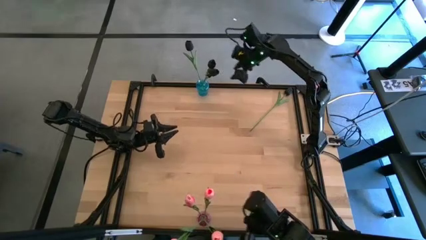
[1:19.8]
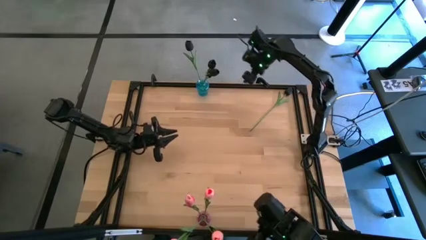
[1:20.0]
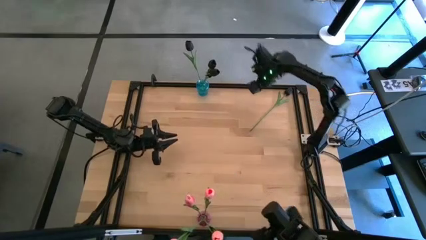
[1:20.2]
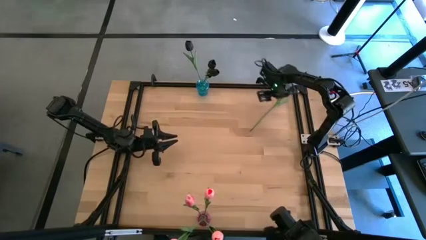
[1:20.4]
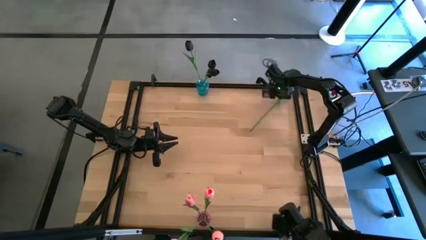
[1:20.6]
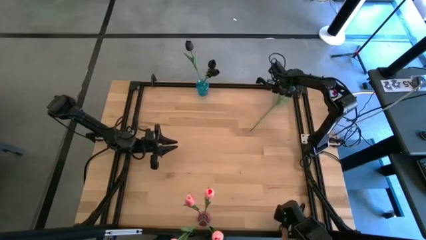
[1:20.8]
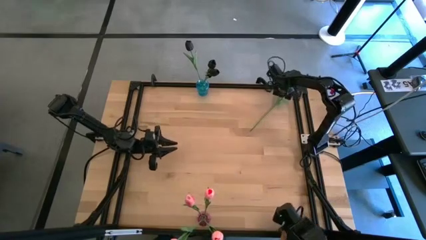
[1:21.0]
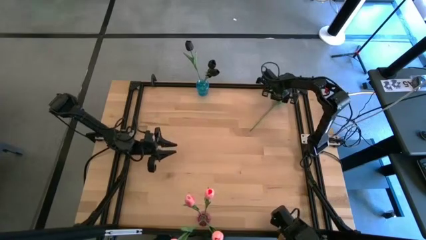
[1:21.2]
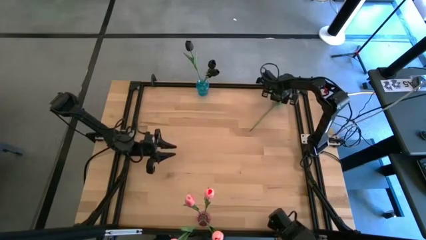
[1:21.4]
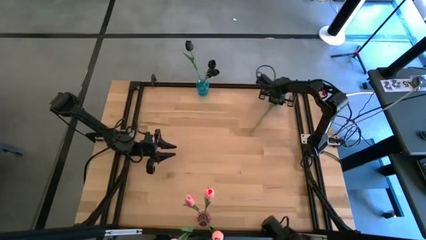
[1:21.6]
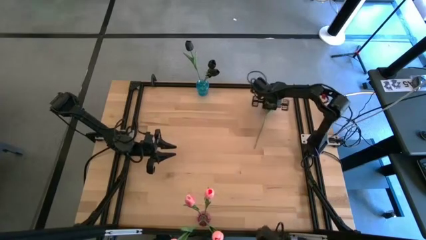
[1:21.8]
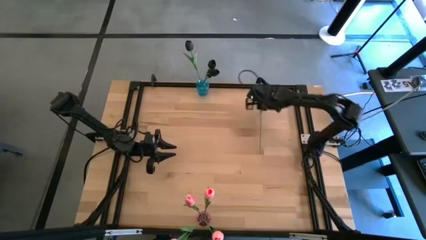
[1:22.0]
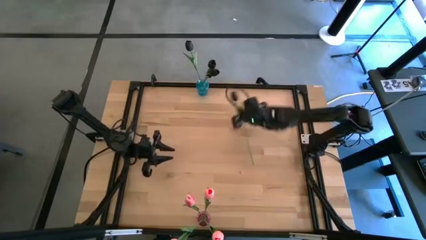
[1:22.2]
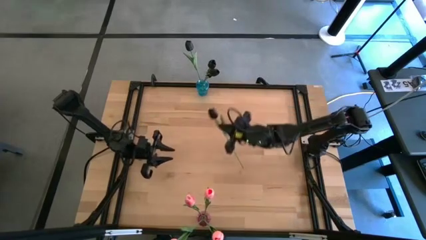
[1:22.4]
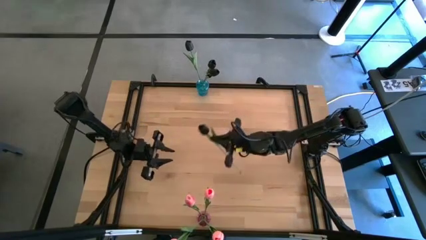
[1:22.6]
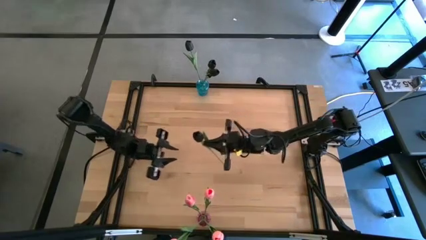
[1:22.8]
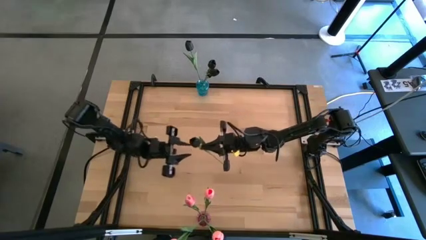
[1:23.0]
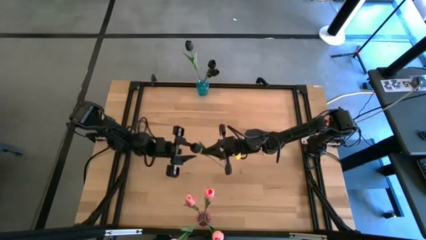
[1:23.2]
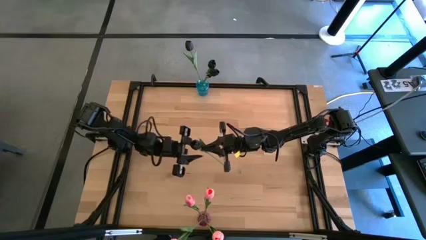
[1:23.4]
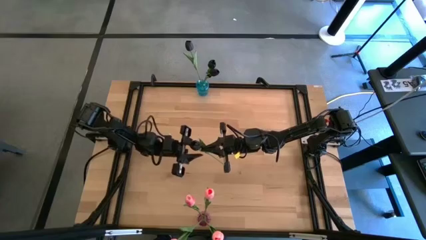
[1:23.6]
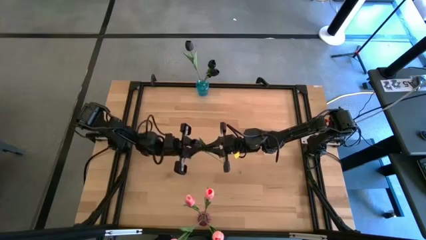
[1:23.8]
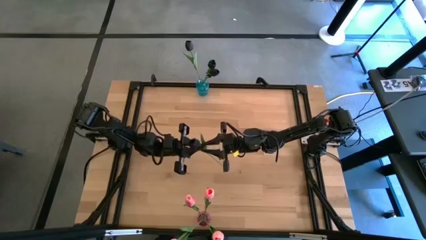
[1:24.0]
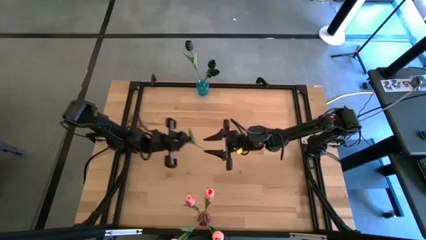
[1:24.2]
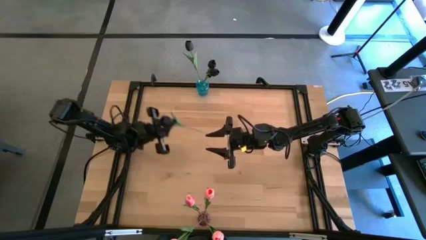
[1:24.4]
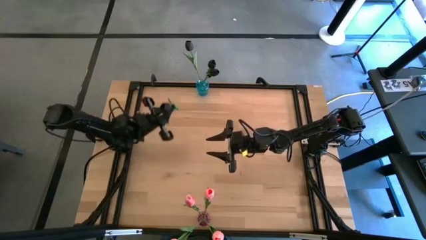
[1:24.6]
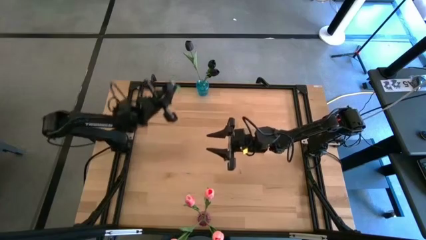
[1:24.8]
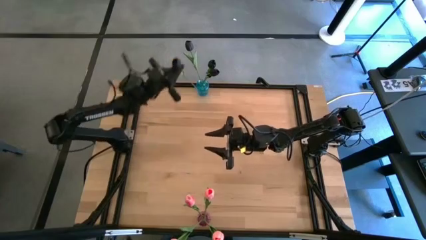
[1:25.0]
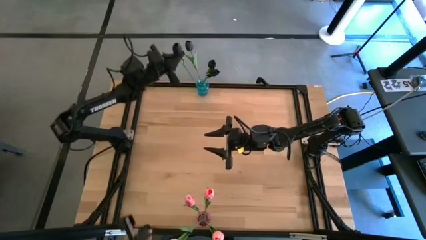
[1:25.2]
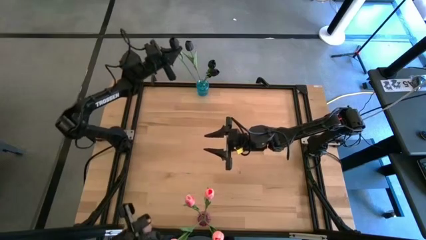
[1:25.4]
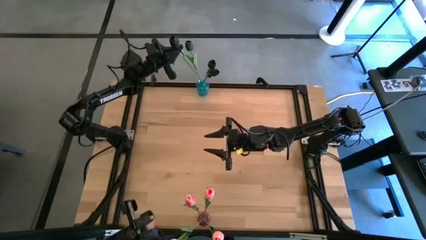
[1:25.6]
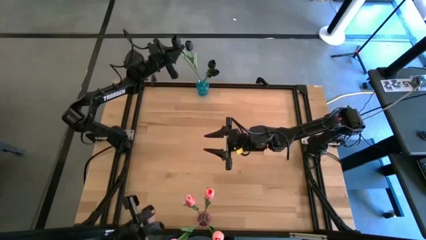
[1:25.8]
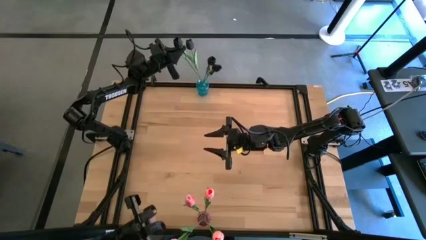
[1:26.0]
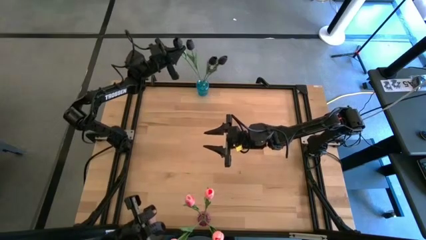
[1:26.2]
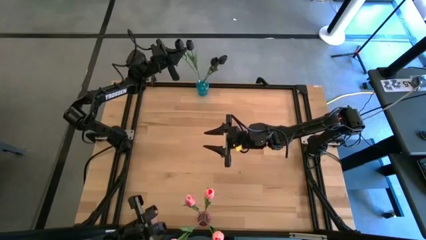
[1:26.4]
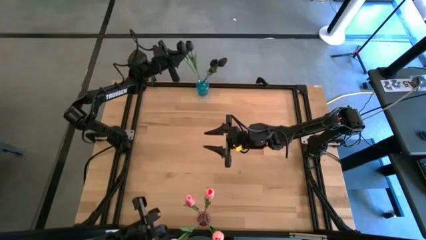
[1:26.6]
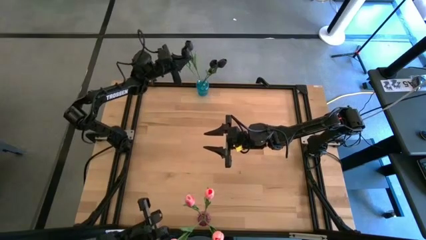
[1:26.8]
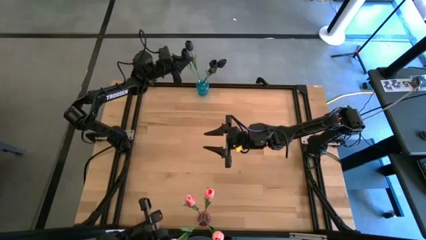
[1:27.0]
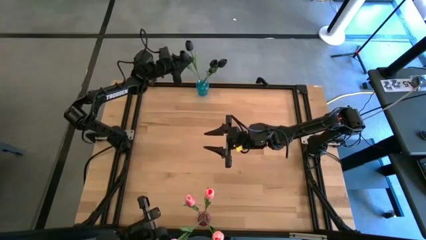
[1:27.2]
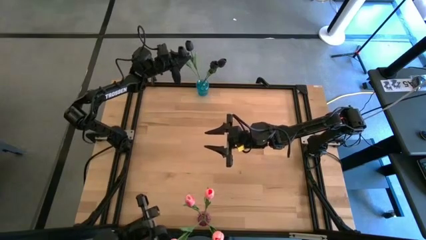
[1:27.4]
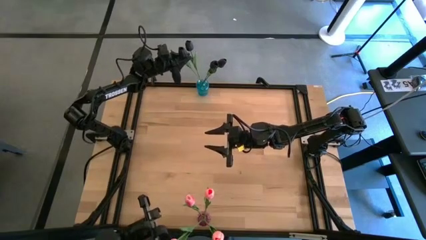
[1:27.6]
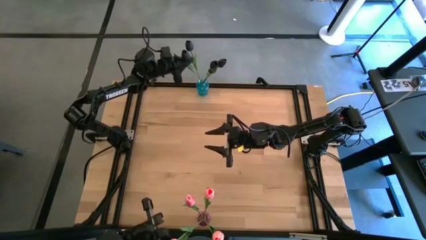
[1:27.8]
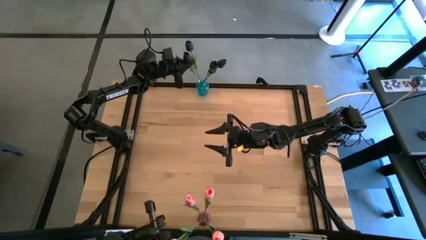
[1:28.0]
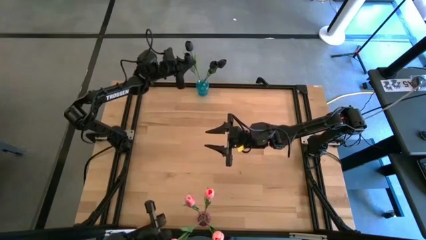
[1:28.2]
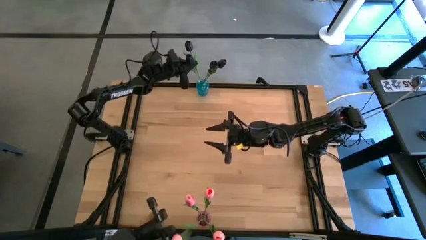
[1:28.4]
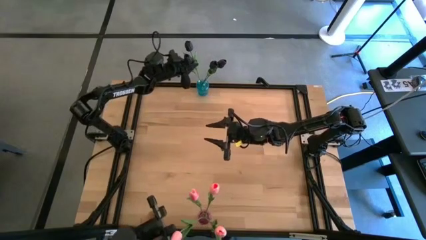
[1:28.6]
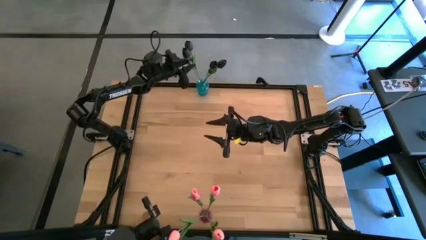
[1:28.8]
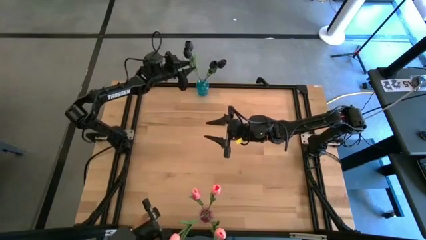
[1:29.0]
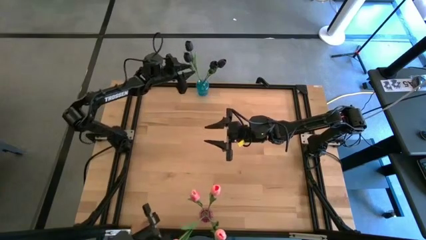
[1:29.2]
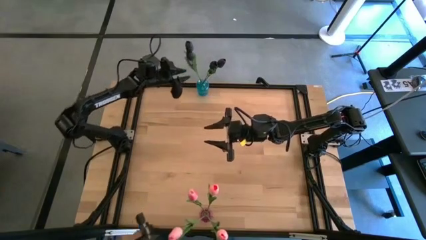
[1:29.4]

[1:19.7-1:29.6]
Task: Sort flowers into vase by color
Put the black flower into the blue vase

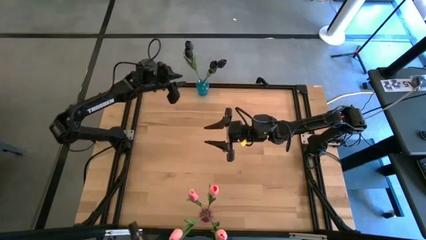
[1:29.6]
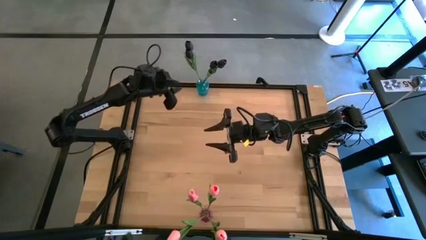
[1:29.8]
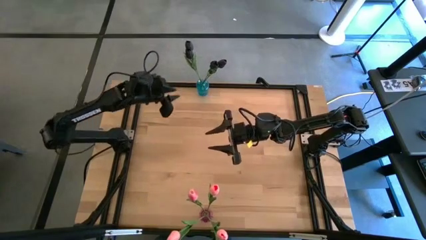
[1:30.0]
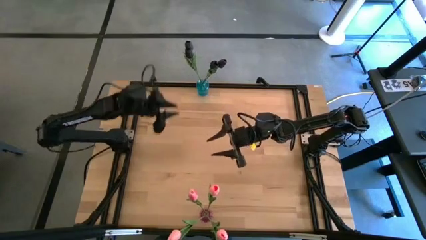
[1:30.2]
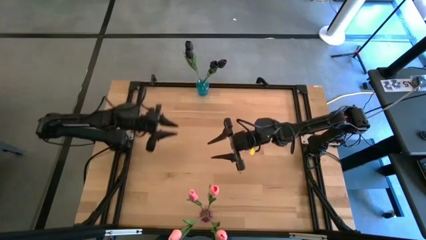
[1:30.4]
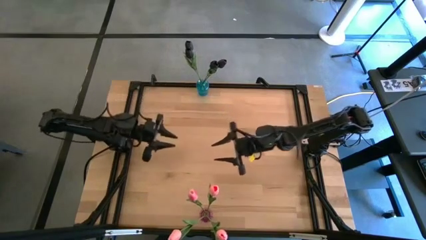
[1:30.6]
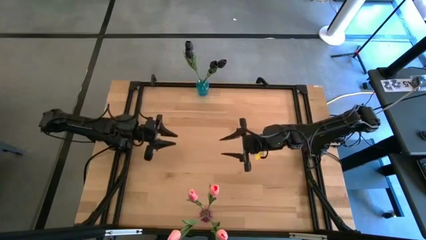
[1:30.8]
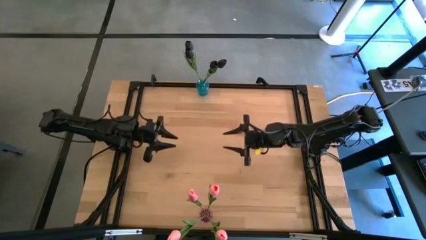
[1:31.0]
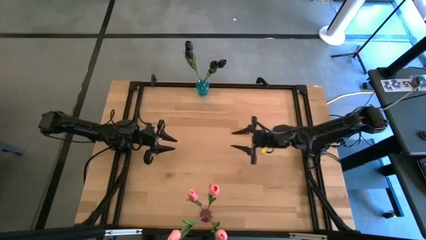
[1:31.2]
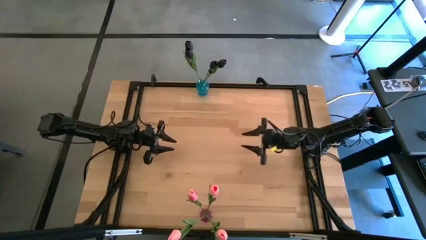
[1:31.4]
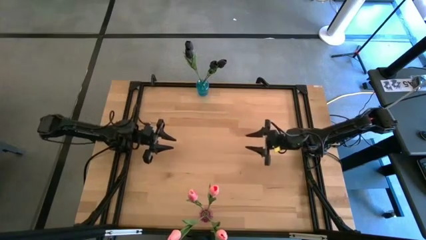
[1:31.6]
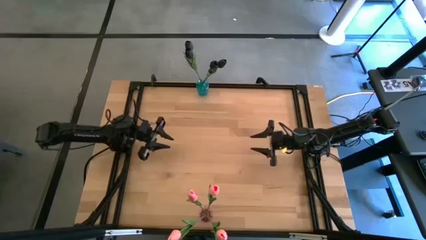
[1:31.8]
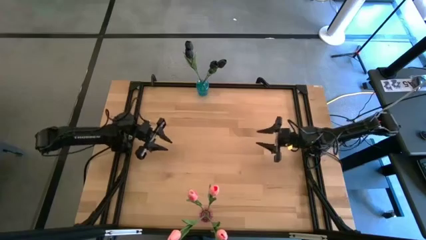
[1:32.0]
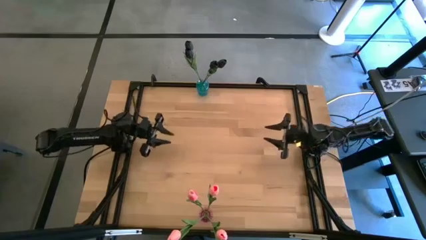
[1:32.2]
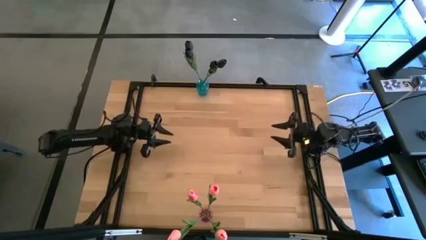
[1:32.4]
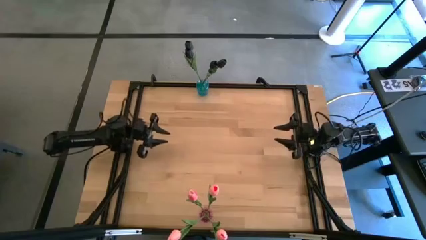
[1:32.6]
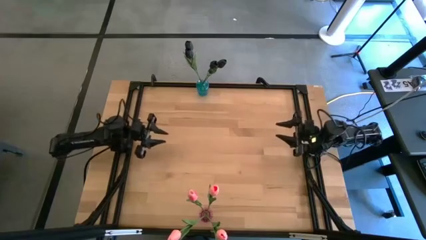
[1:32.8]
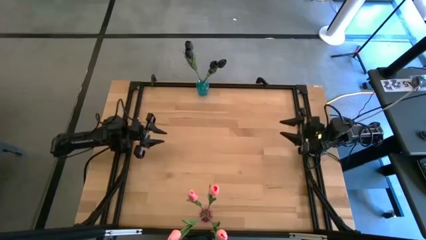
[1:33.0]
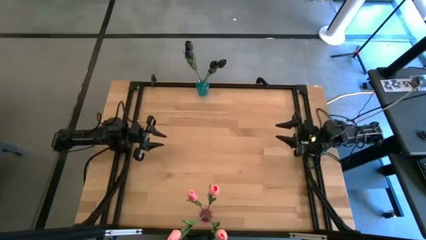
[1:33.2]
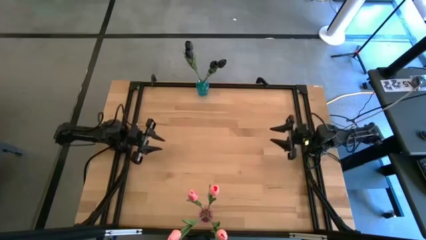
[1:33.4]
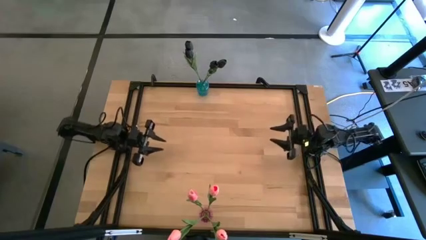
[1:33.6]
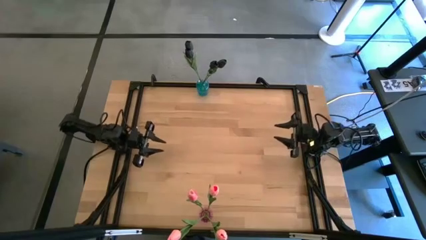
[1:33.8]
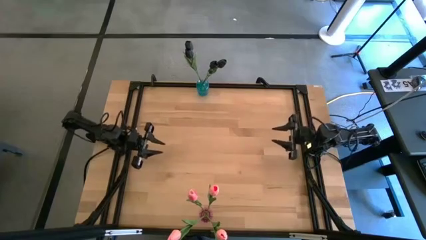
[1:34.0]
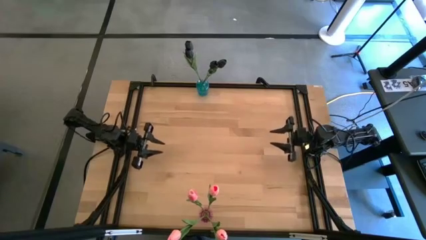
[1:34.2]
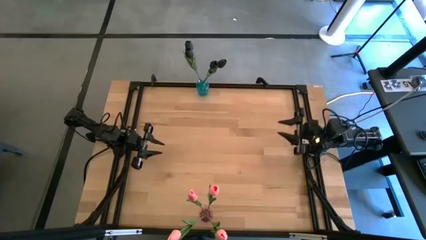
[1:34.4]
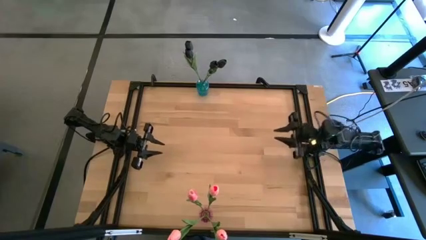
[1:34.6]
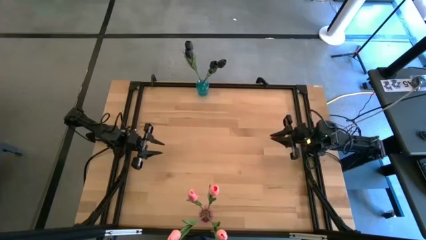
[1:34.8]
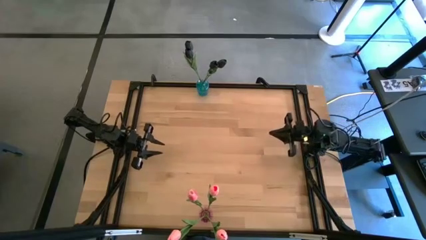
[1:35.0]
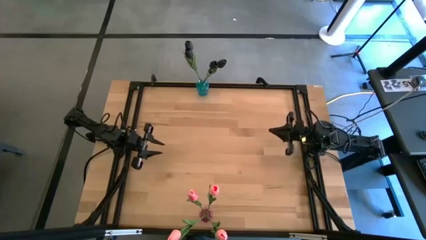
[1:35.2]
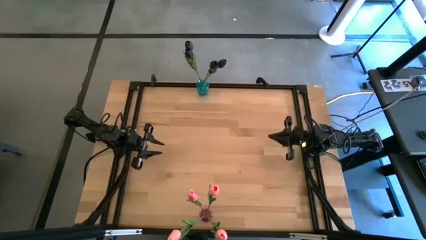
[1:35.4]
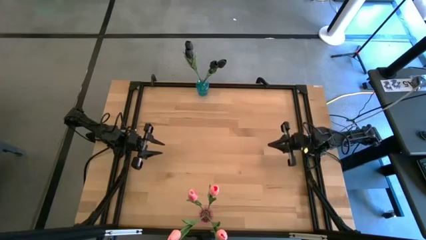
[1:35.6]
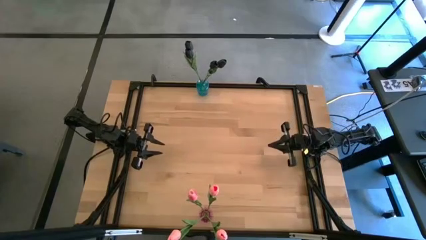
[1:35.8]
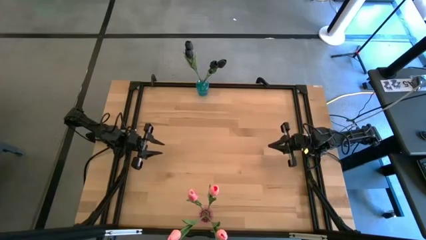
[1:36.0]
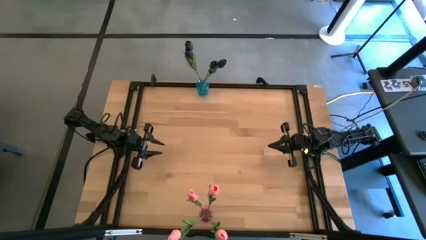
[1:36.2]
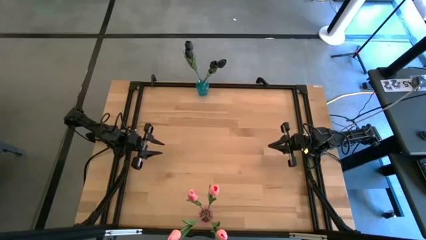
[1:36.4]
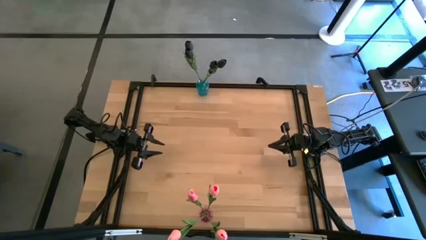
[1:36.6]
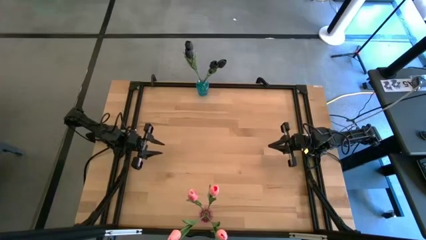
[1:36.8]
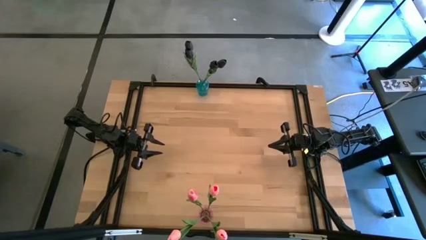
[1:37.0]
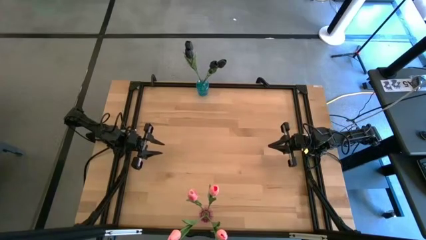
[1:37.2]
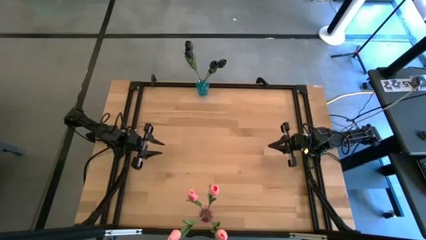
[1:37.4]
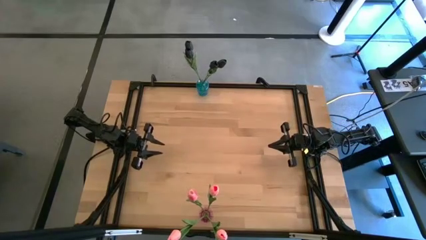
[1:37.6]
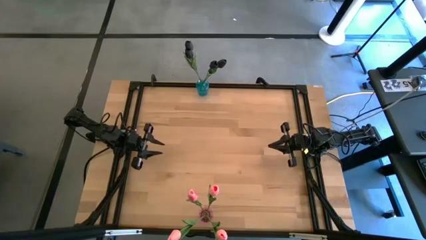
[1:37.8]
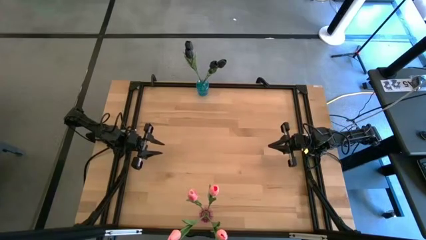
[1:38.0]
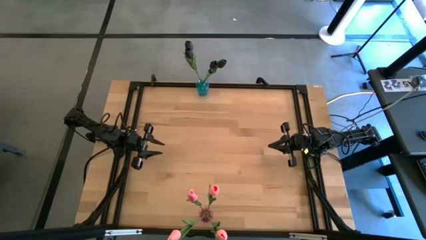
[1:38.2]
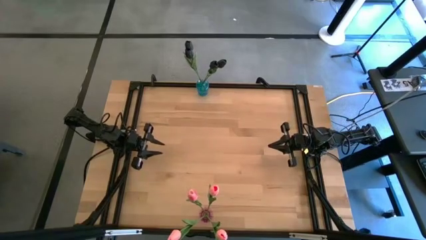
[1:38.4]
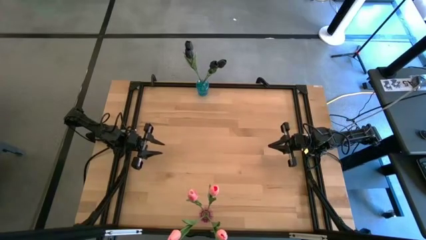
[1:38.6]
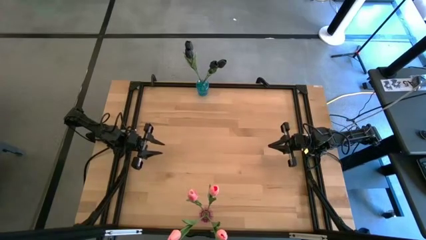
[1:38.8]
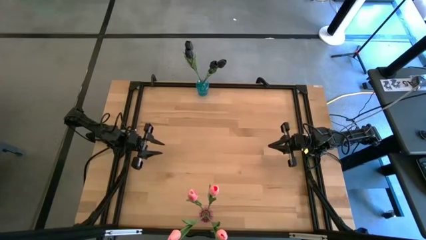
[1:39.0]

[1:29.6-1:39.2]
Return to Home Position
